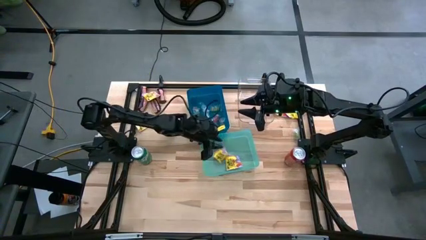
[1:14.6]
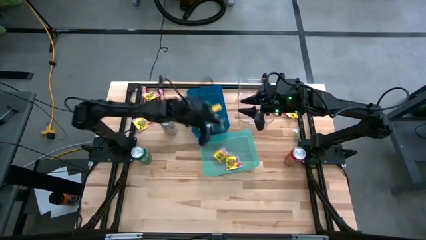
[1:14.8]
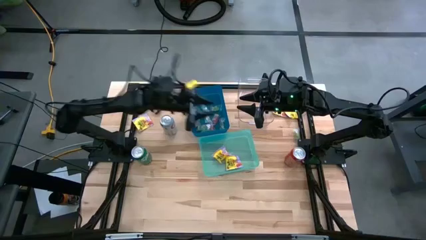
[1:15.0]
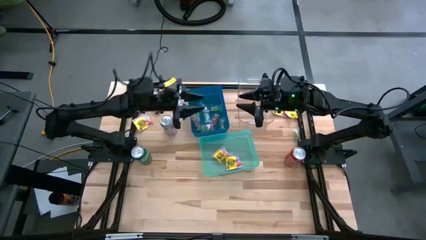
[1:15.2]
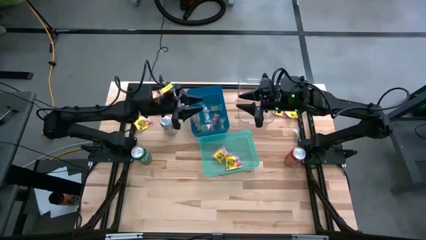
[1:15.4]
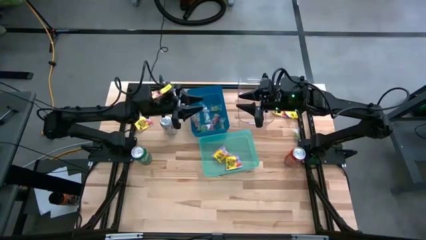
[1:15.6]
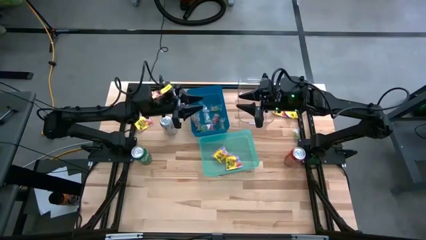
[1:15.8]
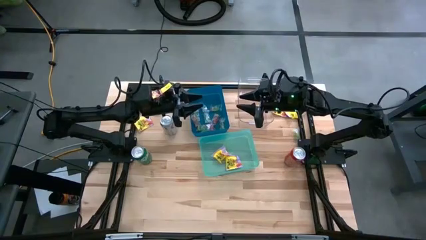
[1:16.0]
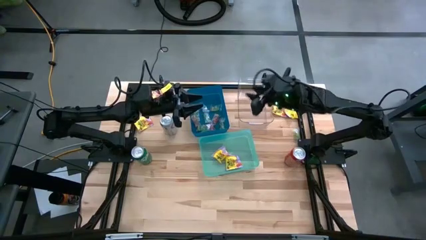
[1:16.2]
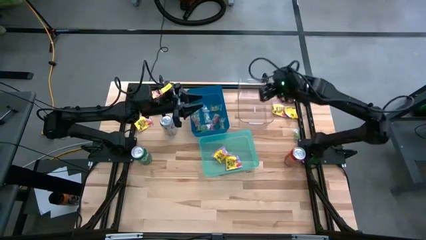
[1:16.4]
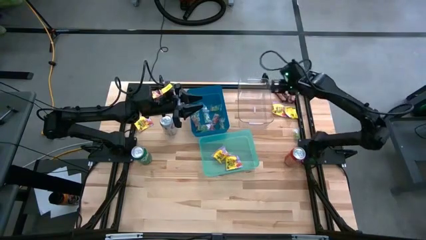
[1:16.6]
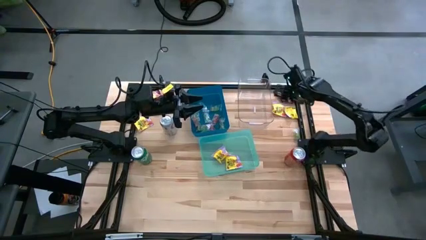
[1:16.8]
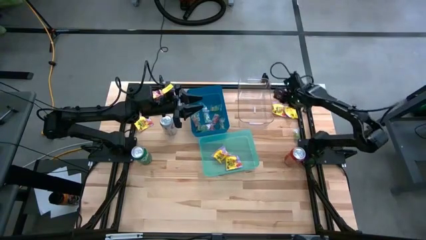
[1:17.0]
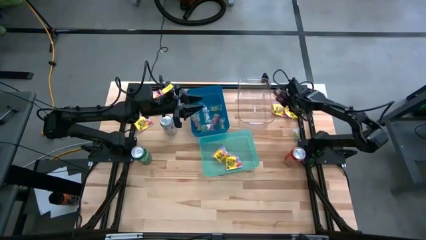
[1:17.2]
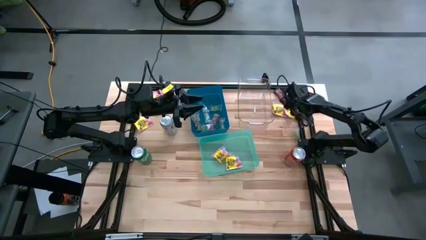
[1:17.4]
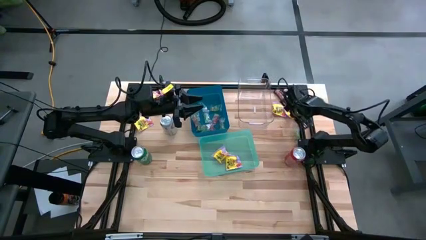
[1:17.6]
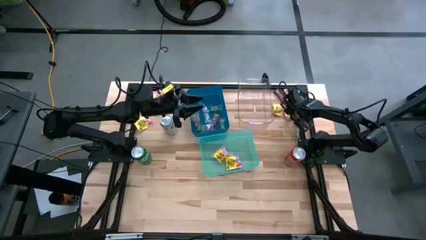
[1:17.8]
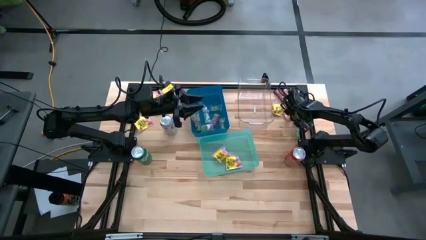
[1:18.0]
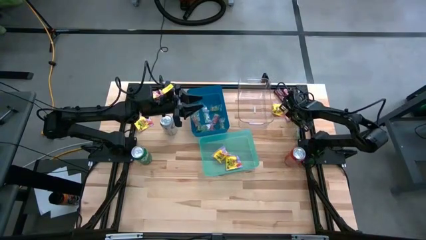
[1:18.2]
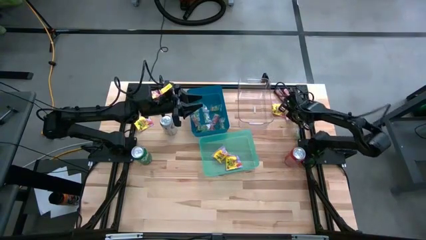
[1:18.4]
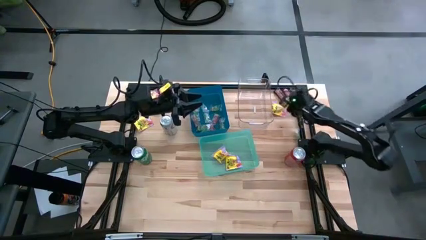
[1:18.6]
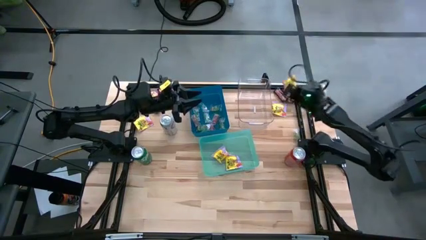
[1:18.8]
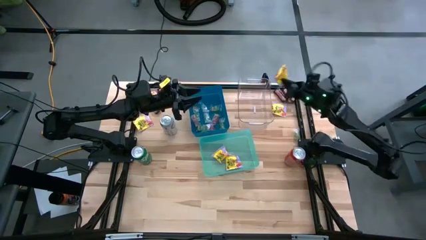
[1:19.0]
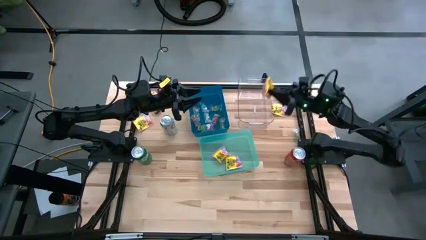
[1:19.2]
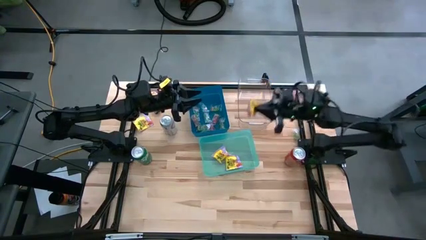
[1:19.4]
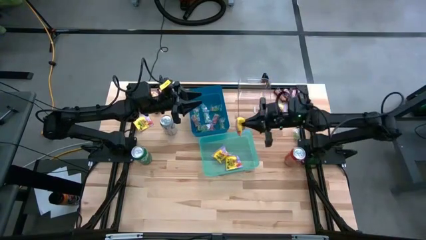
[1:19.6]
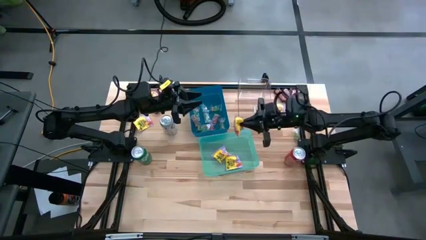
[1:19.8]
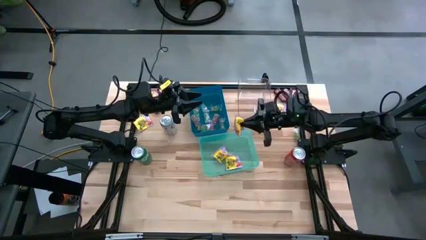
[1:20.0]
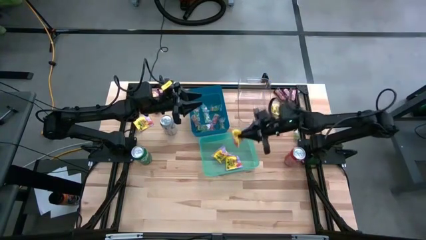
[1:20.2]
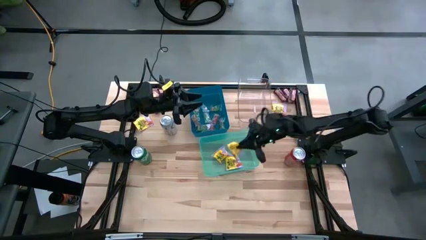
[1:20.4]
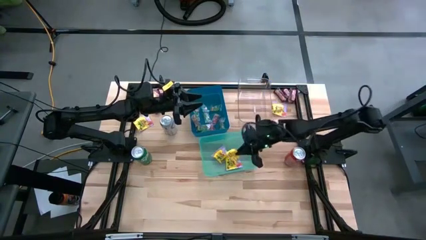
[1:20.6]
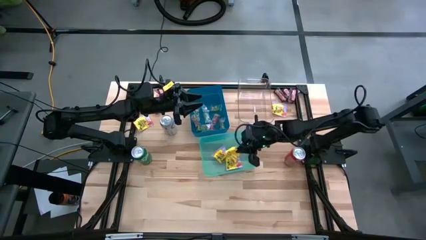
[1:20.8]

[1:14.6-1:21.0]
Task: Sort candy
Put the yellow candy into the green bin

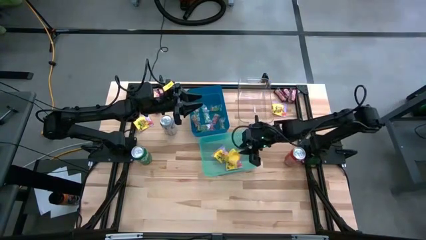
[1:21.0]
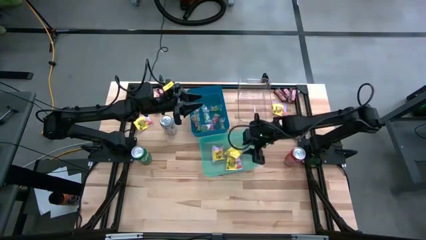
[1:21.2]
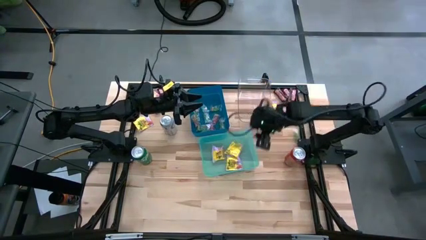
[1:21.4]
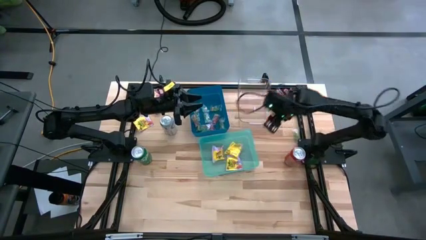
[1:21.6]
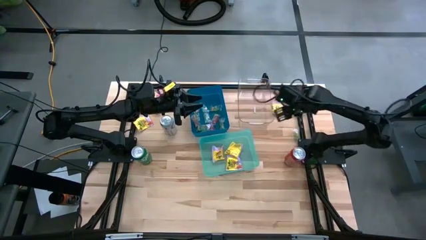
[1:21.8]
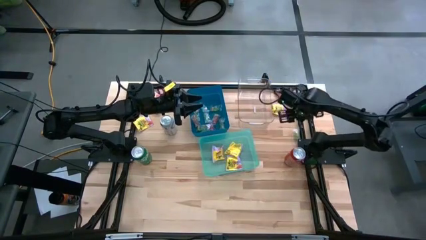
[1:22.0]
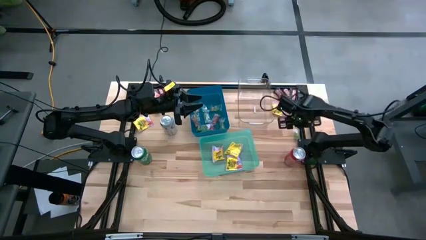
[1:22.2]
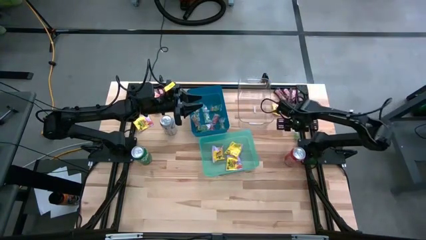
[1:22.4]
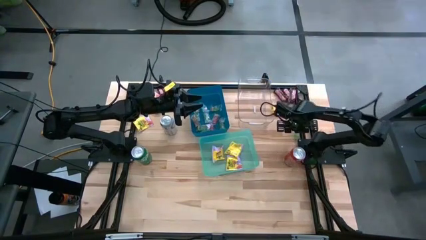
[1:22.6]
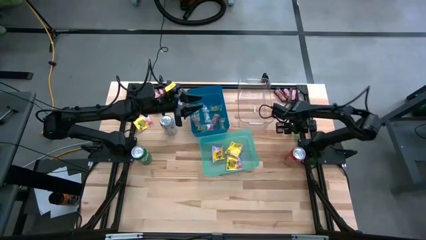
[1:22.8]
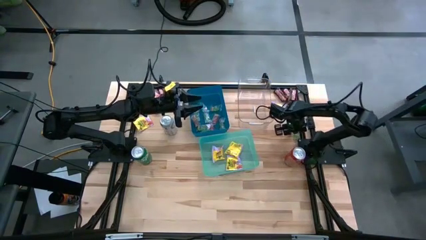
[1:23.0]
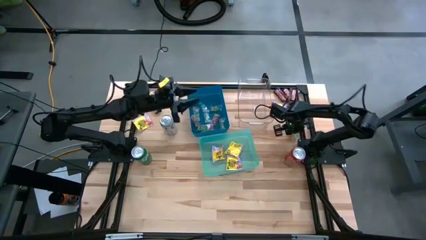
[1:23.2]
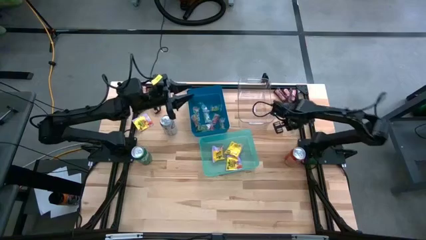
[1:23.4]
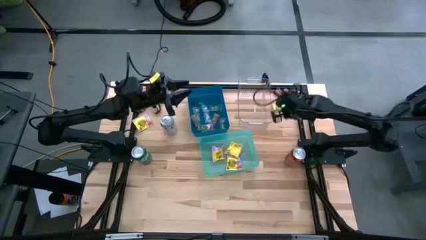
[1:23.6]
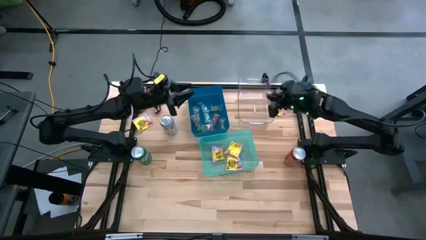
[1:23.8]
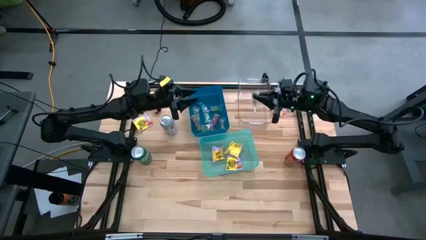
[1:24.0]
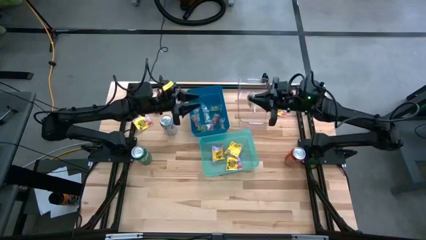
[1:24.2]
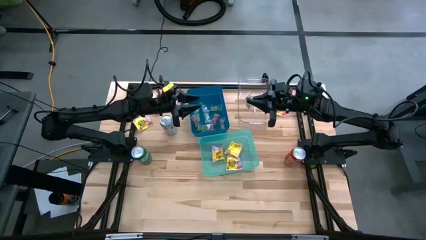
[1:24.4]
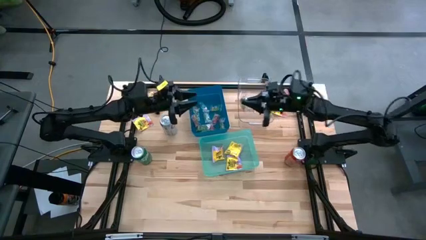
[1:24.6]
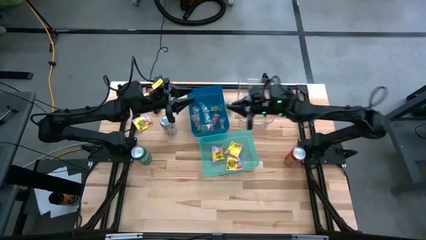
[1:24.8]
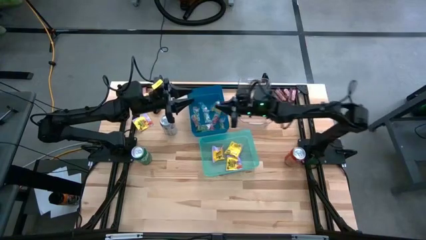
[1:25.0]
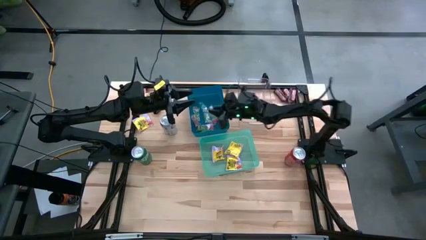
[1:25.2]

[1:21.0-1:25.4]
Put the green candy into the blue bin

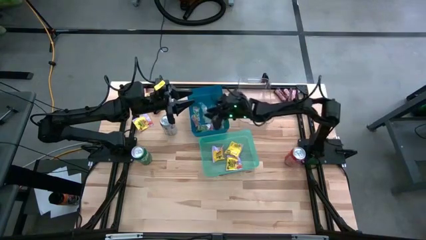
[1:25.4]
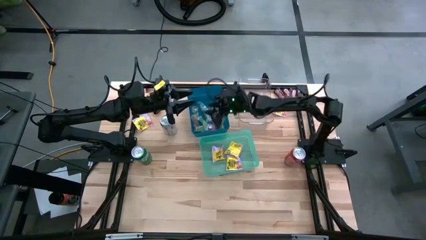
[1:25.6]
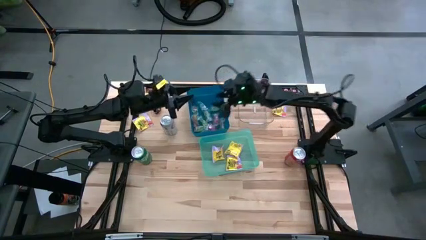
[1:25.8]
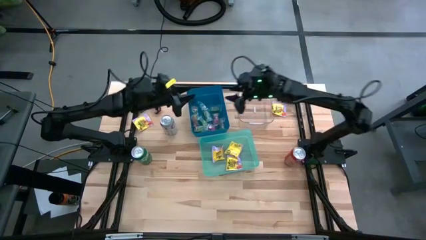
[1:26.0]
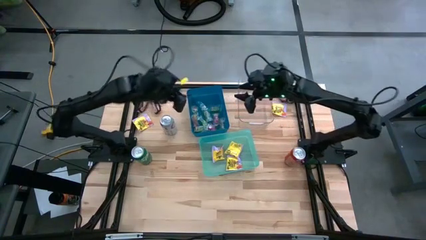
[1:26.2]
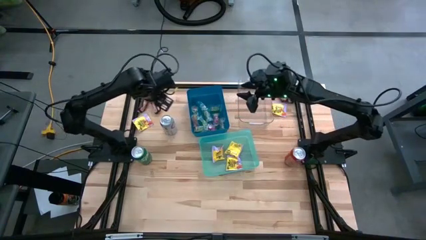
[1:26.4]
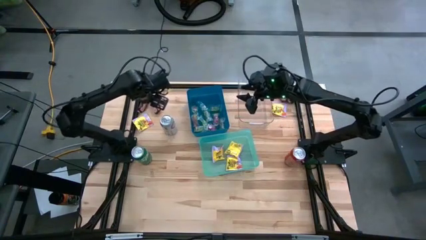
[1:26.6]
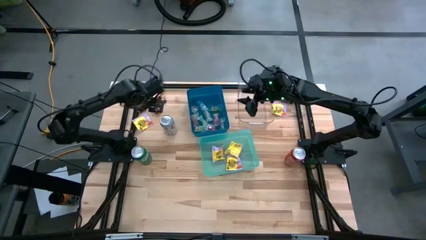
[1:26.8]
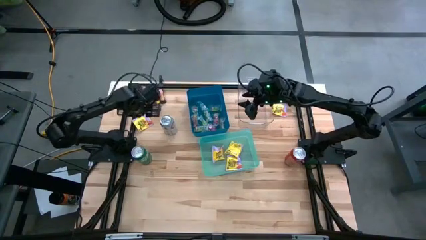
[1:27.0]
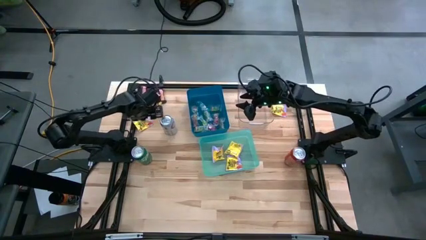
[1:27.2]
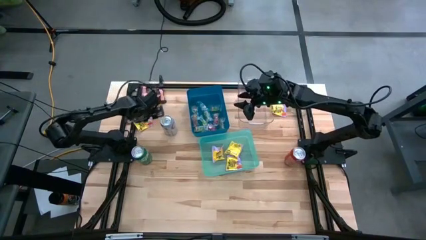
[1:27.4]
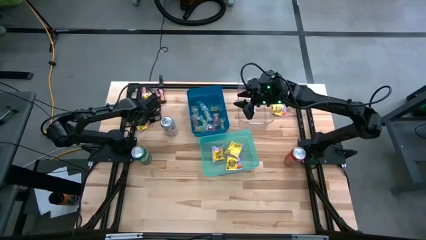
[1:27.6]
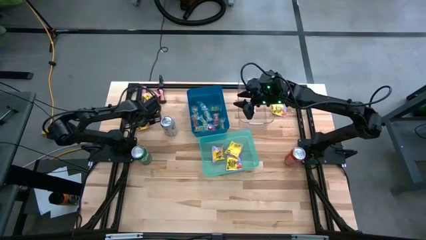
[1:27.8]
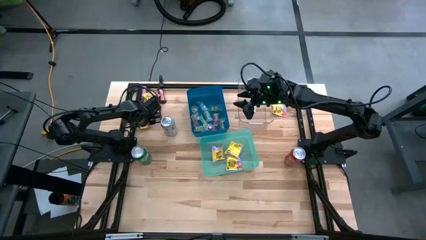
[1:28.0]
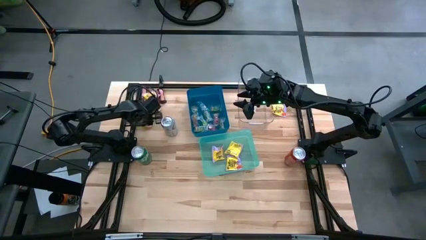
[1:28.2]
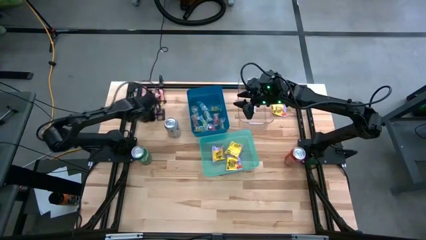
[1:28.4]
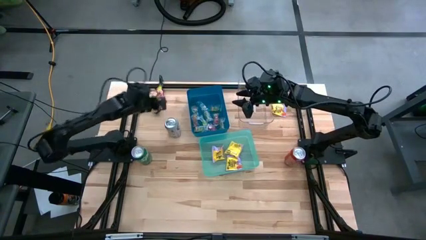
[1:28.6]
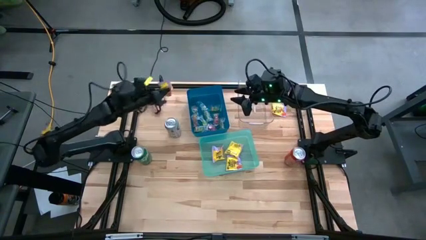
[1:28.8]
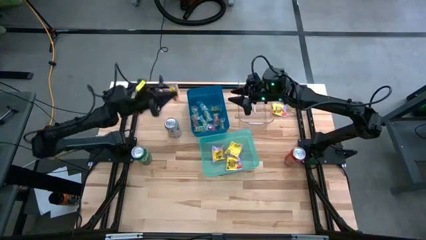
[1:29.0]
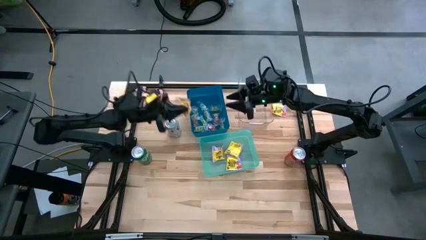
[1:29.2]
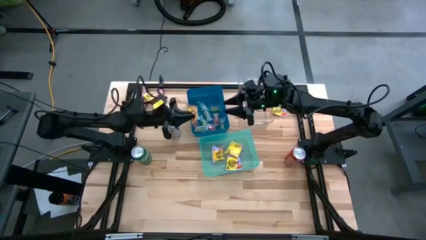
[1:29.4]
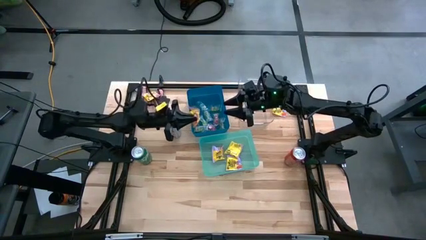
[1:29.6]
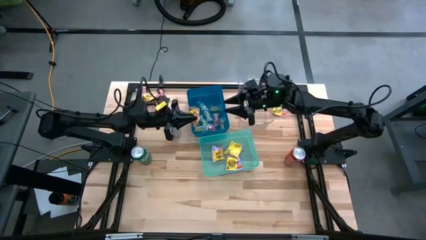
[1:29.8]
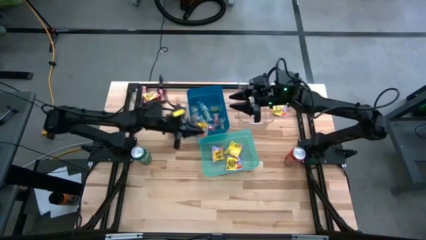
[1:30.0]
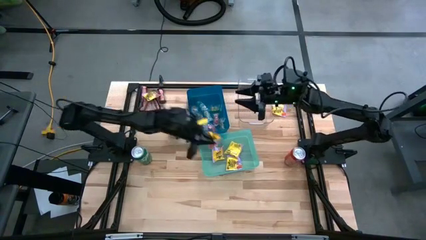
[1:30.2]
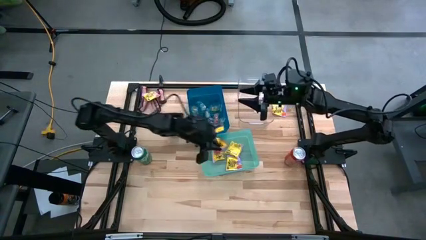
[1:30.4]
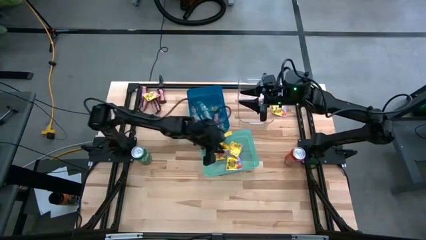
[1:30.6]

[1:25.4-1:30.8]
Put the yellow candy into the green bin
